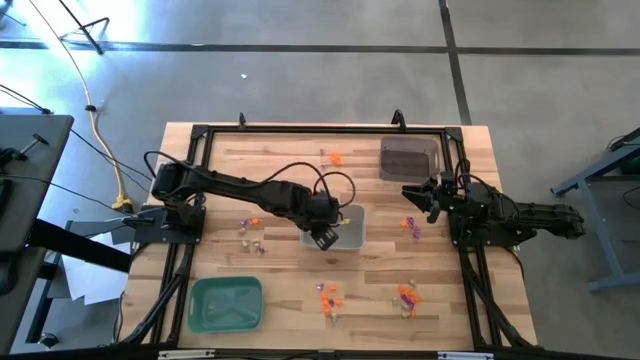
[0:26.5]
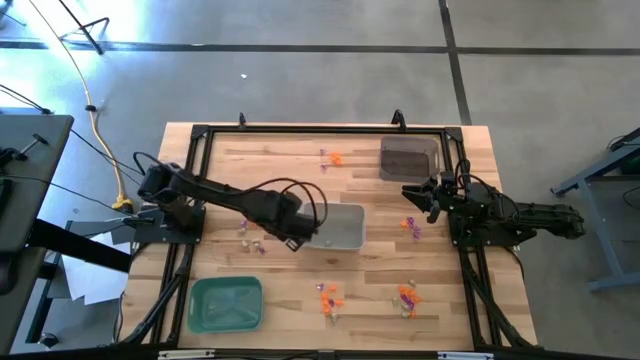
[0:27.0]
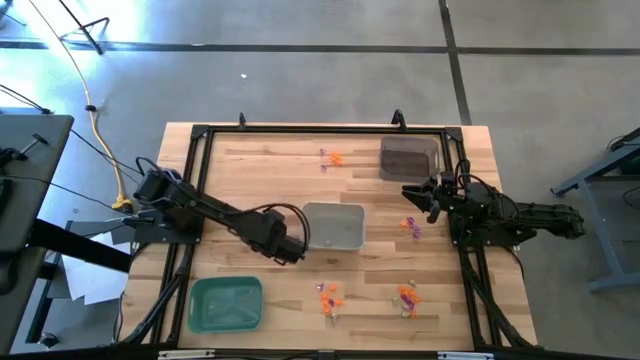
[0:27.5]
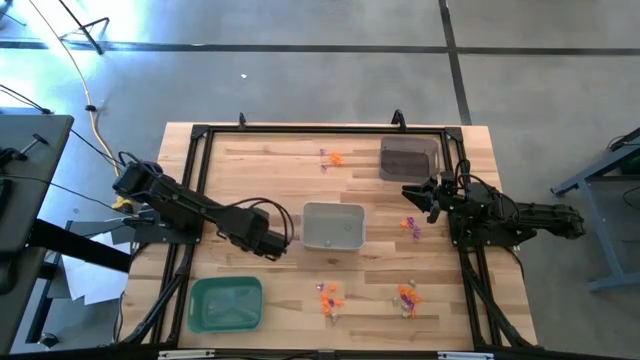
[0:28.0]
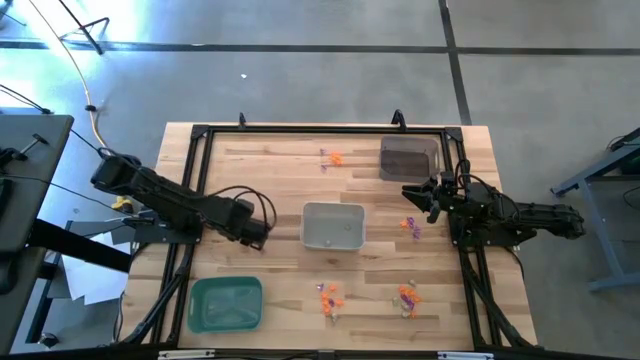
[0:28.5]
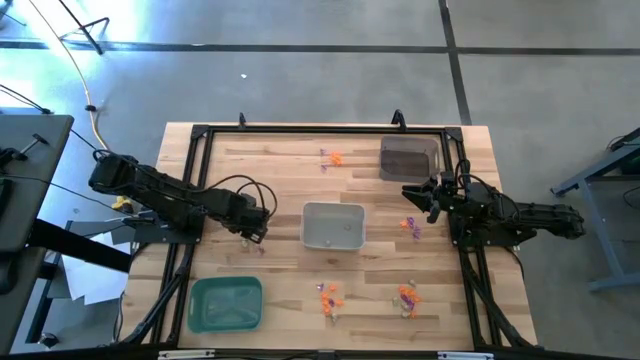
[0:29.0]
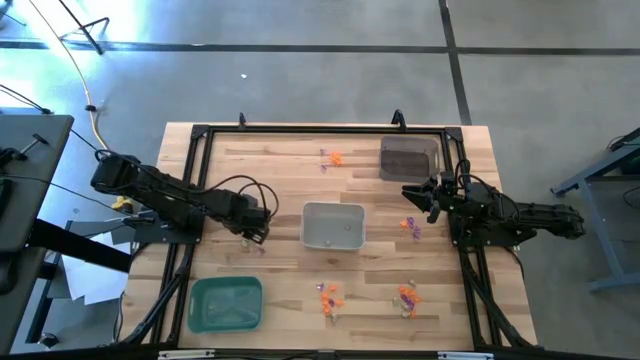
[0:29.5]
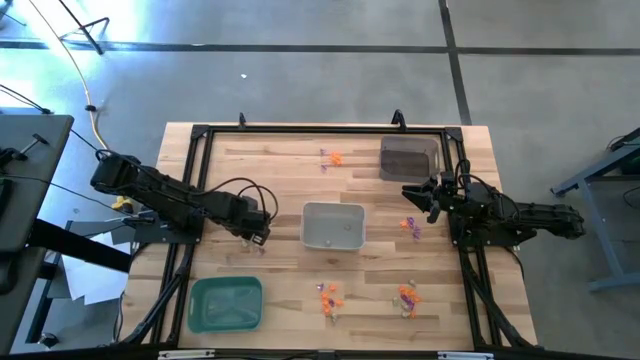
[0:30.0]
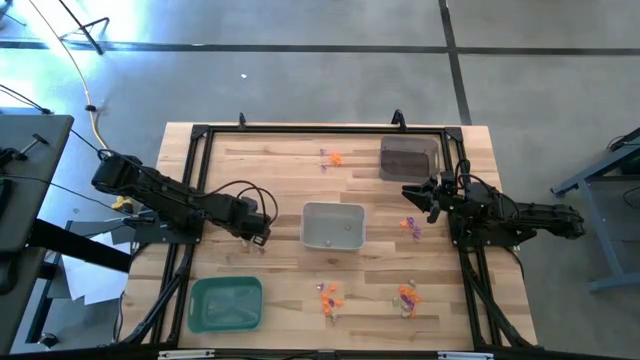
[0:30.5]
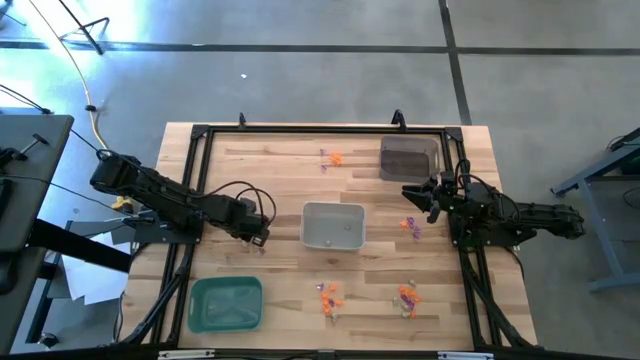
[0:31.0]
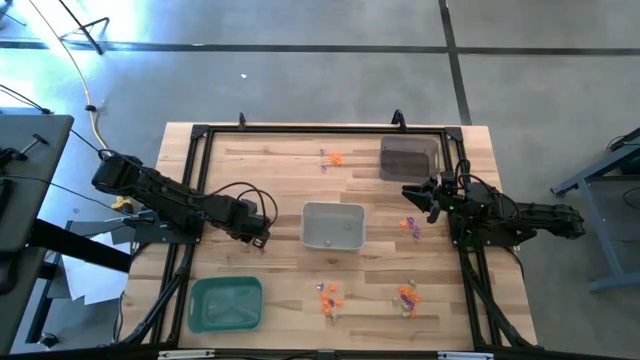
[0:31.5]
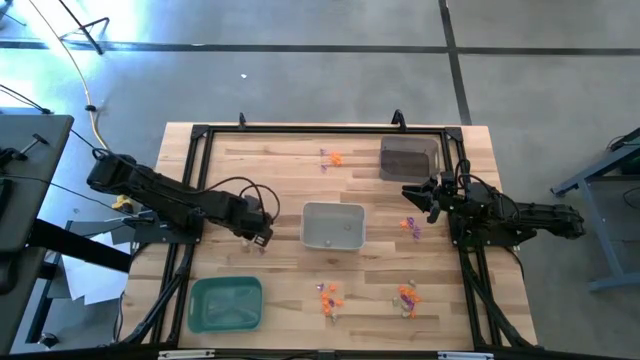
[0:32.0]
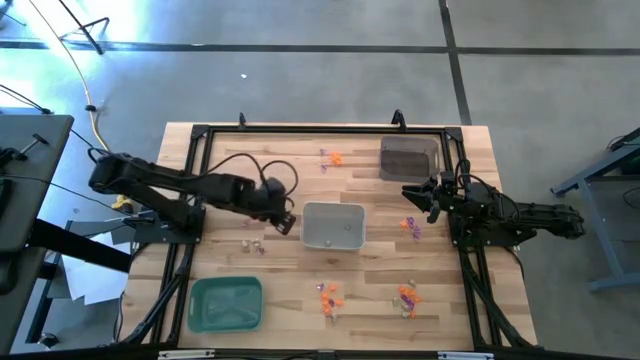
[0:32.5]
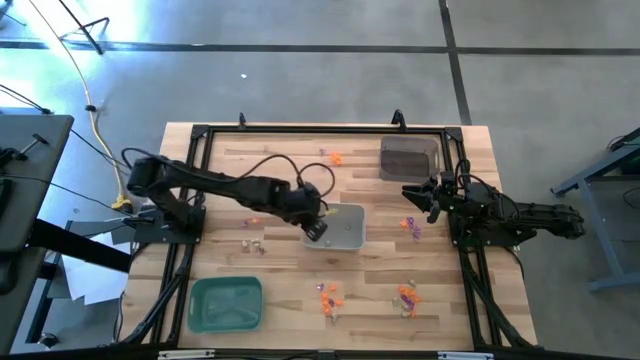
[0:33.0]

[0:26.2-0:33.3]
Task: Sort Halloween decoration
Put the white skull toy into the white bin

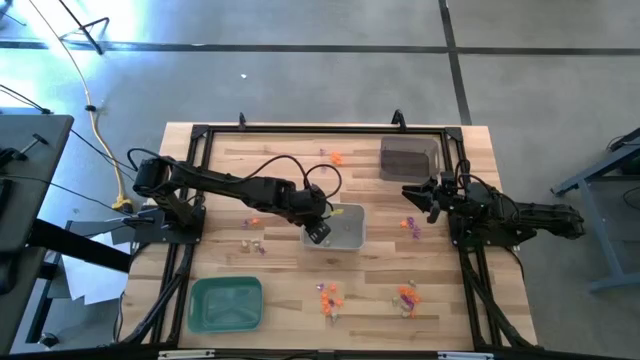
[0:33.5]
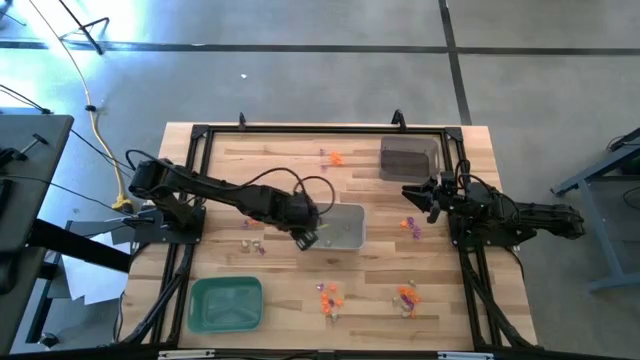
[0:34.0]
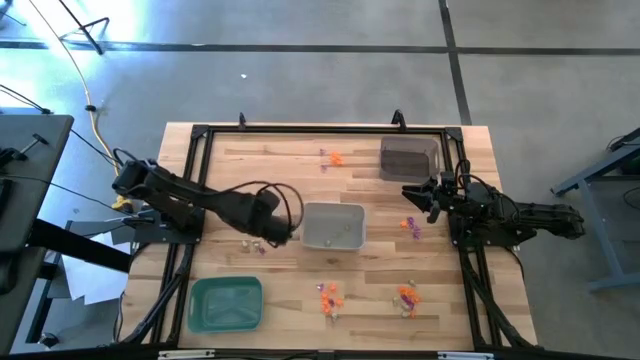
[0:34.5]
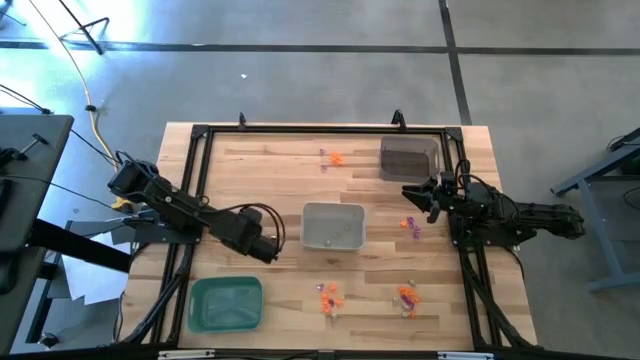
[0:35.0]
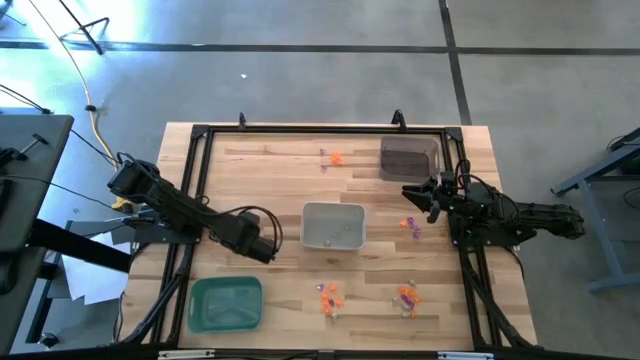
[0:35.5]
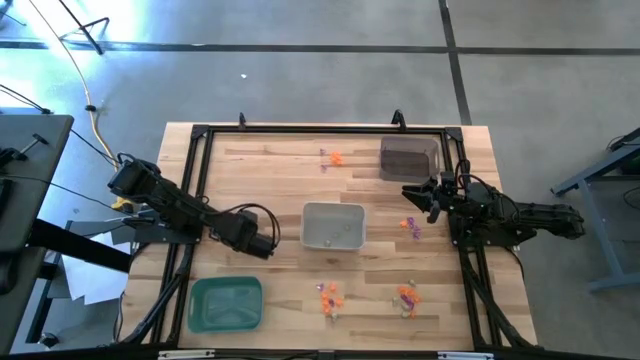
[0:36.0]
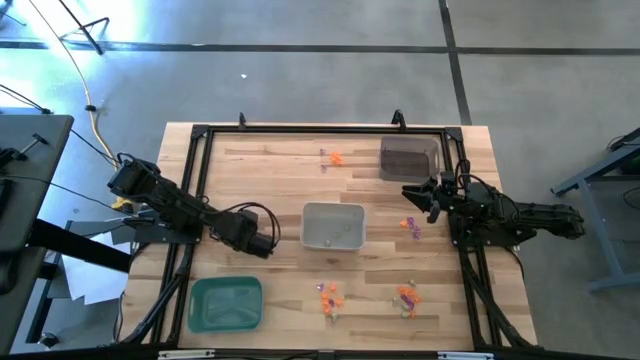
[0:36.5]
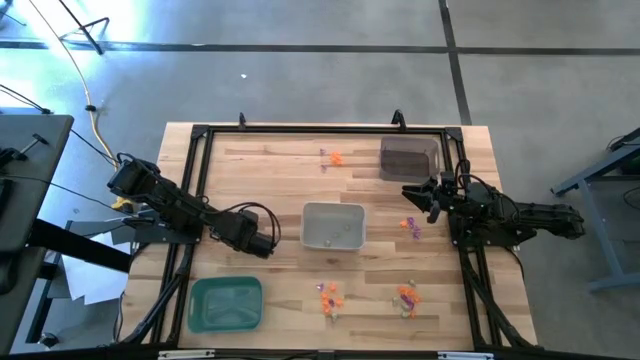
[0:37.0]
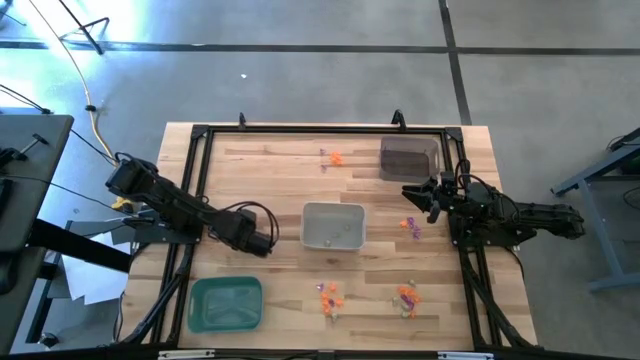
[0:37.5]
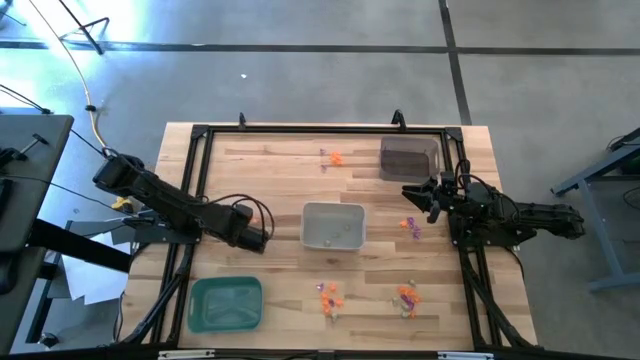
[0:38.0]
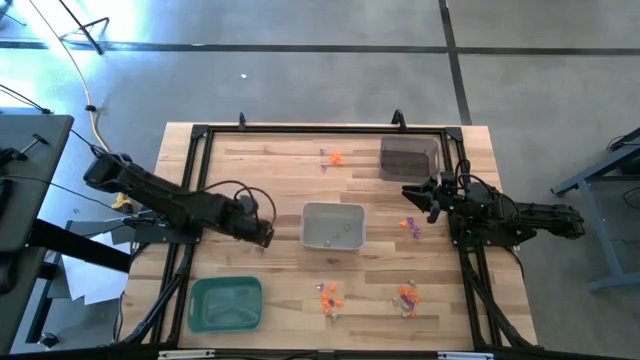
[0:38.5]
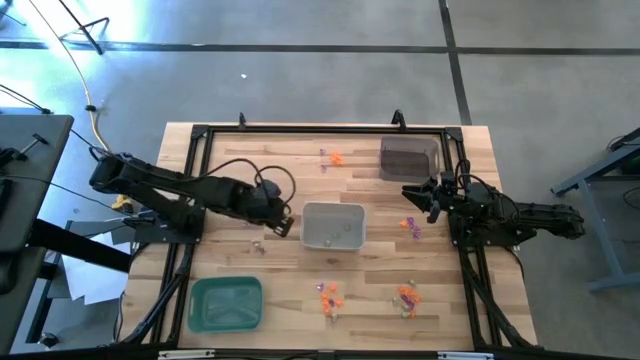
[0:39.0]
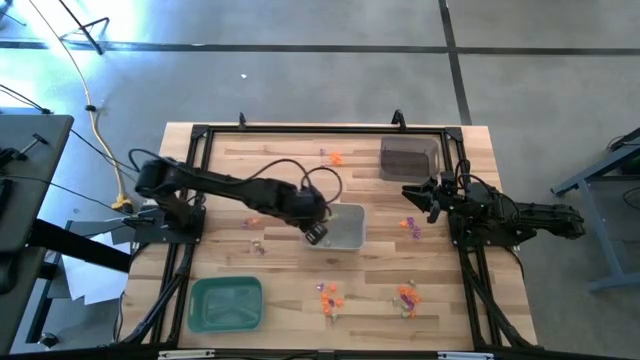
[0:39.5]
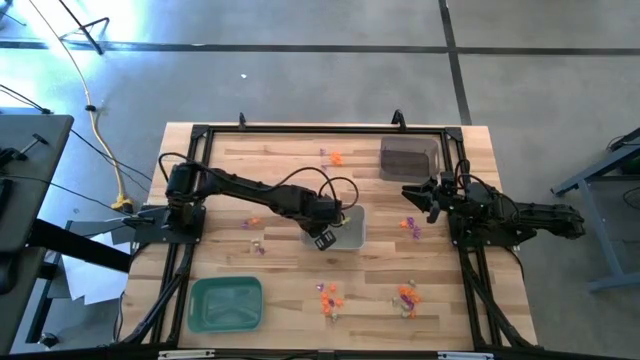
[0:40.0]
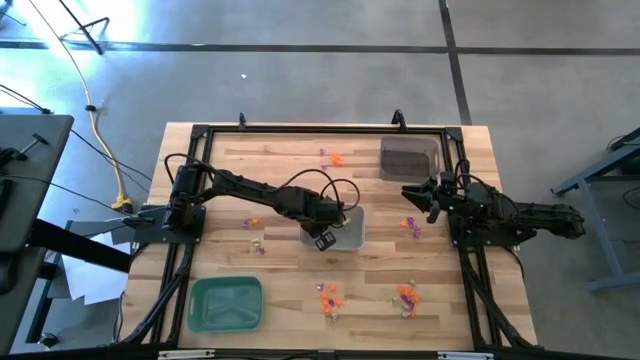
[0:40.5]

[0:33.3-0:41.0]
Put the white skull toy into the white bin

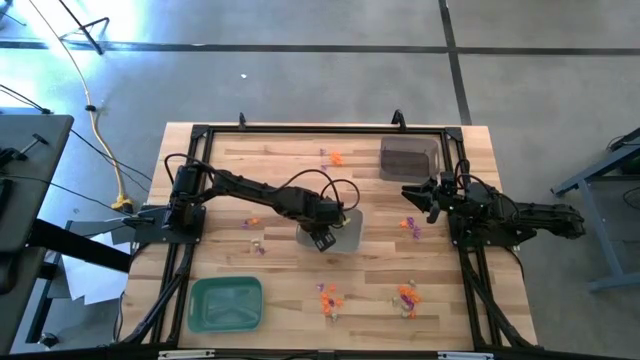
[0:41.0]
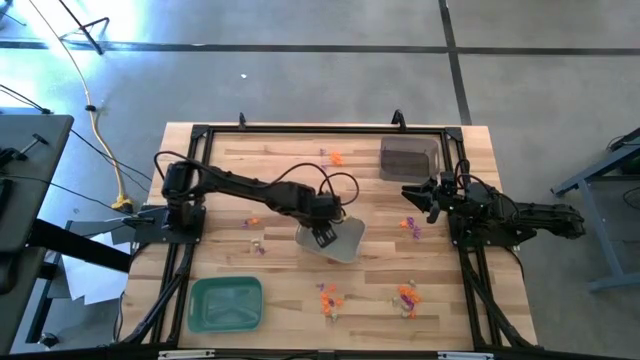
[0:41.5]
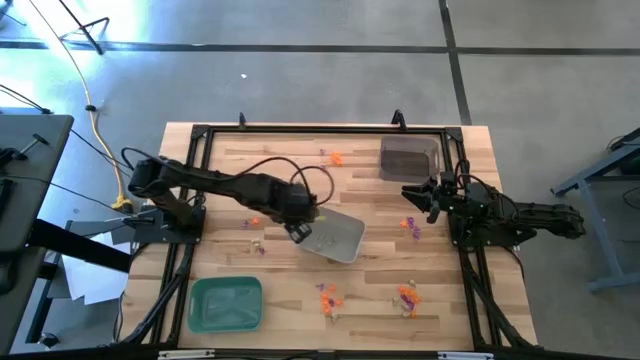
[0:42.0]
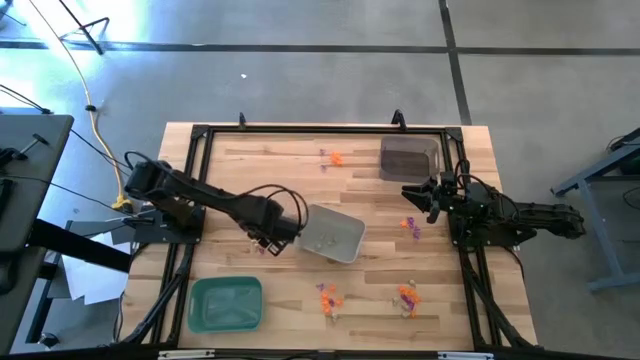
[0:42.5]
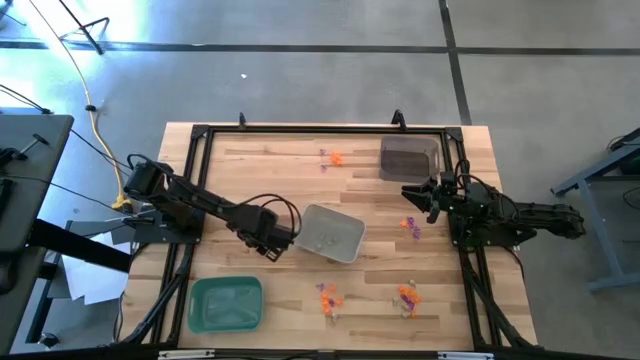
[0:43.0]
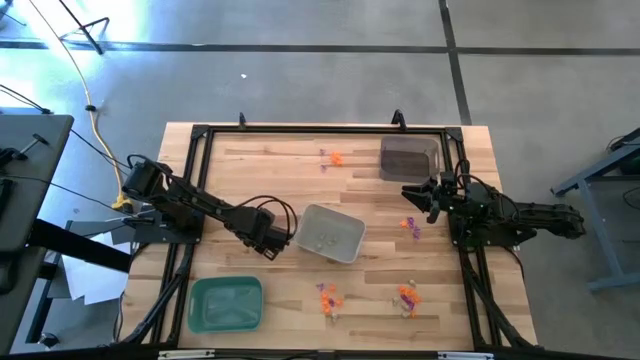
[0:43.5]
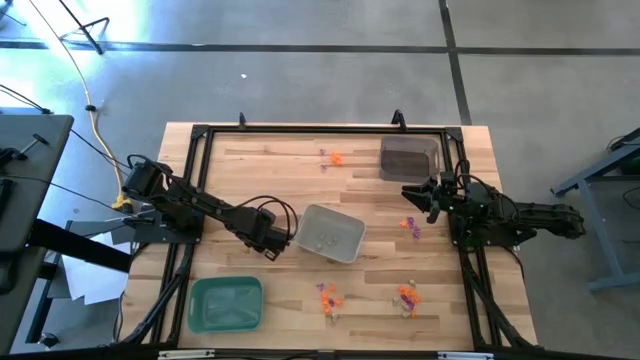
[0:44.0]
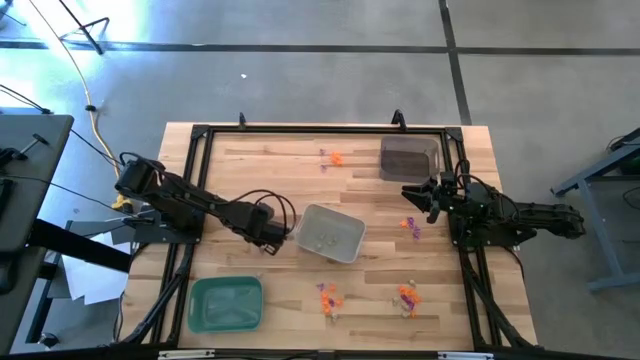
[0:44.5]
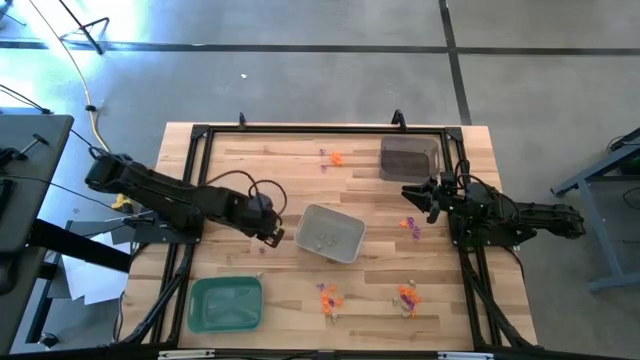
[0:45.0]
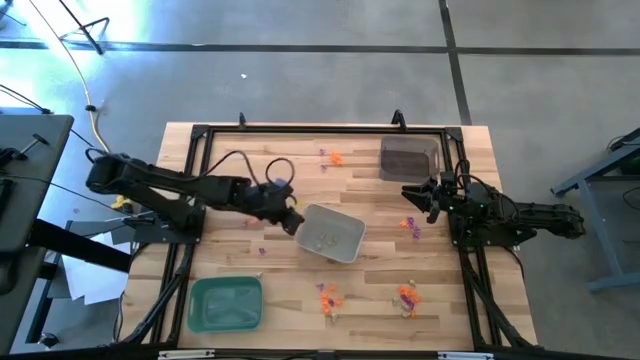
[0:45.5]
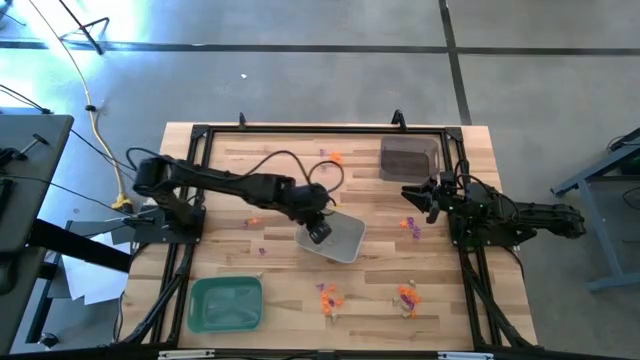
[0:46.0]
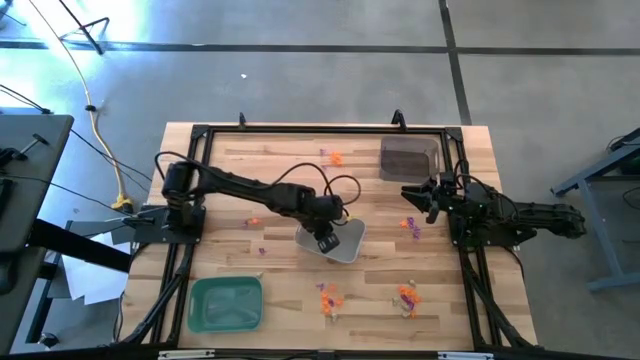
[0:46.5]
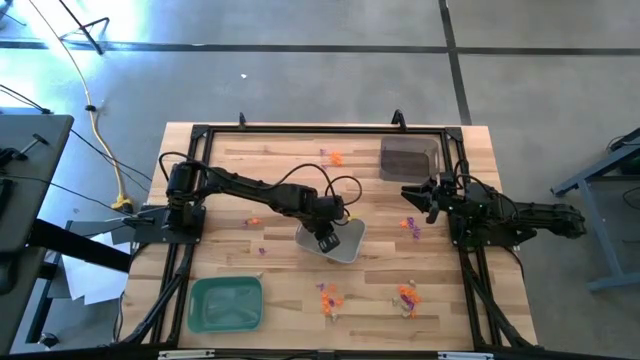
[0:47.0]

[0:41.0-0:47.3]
Put the white skull toy into the white bin
